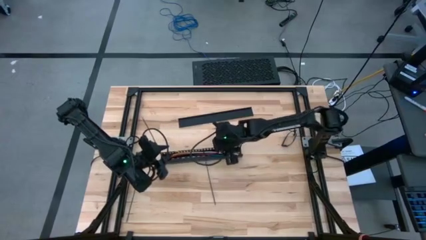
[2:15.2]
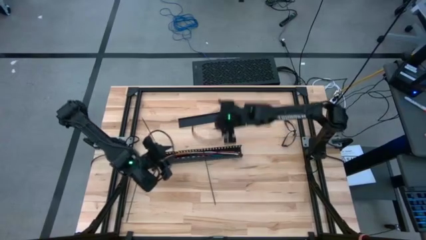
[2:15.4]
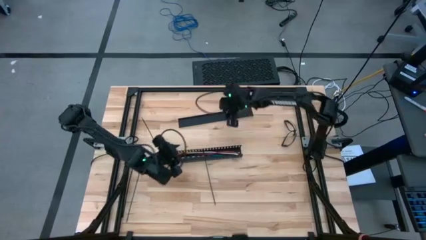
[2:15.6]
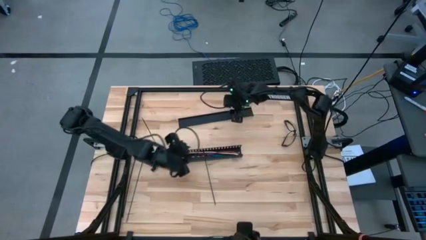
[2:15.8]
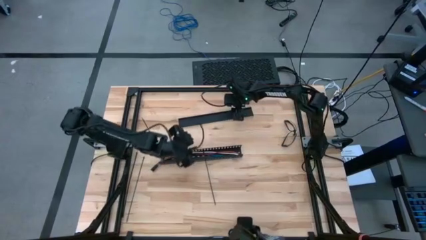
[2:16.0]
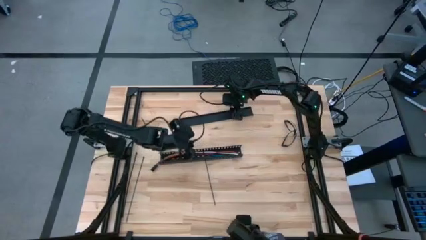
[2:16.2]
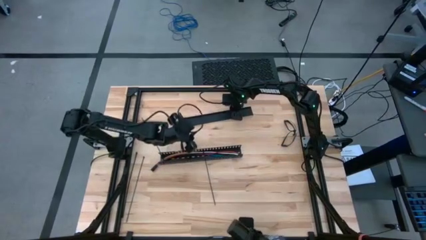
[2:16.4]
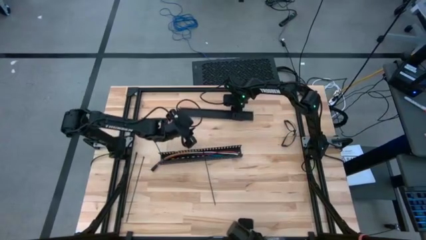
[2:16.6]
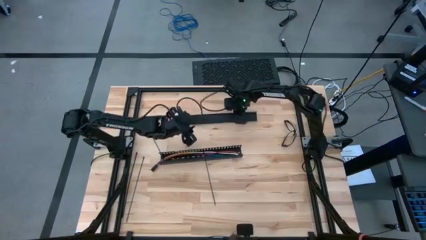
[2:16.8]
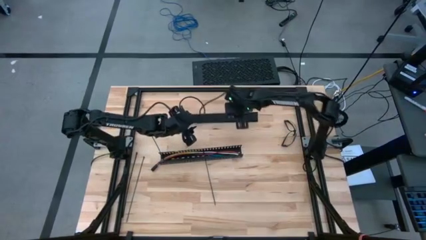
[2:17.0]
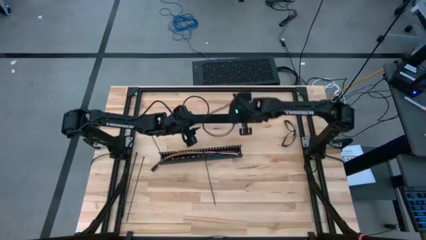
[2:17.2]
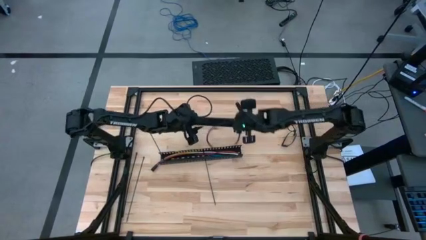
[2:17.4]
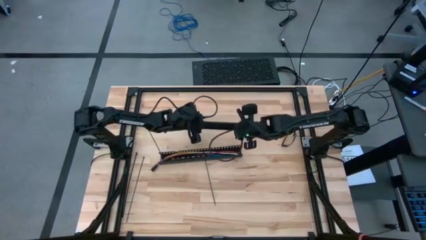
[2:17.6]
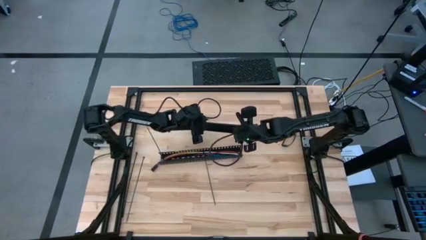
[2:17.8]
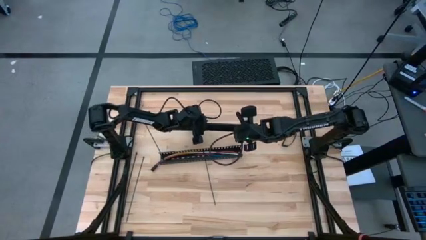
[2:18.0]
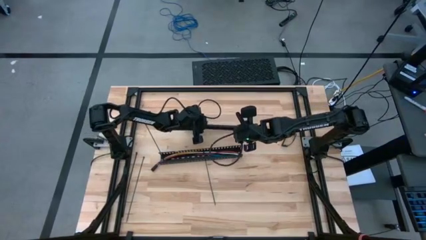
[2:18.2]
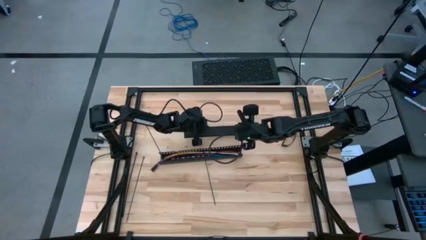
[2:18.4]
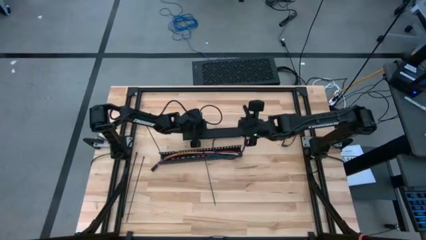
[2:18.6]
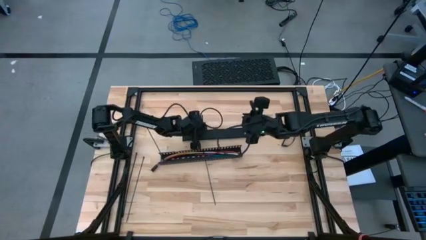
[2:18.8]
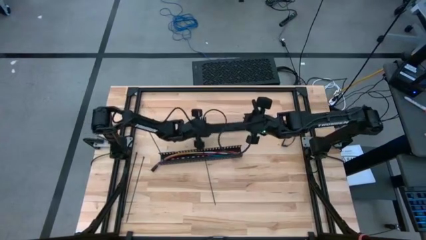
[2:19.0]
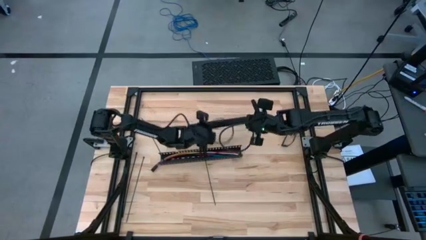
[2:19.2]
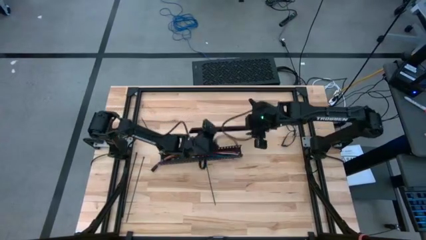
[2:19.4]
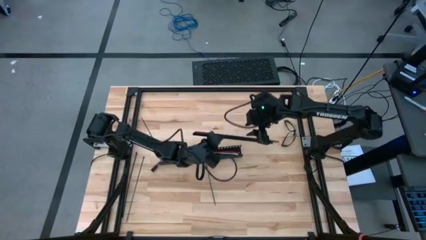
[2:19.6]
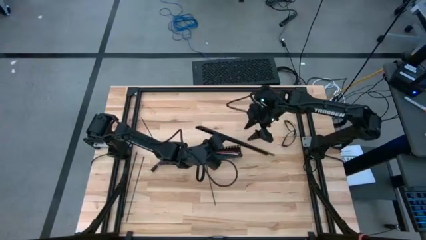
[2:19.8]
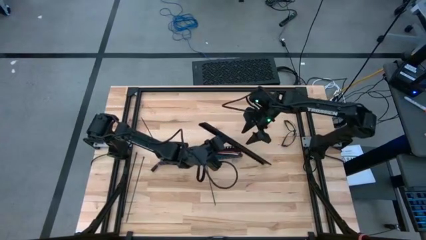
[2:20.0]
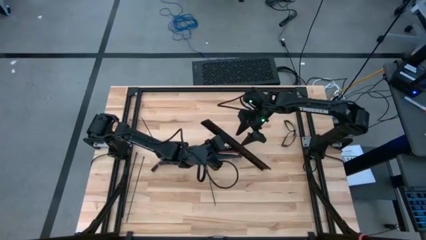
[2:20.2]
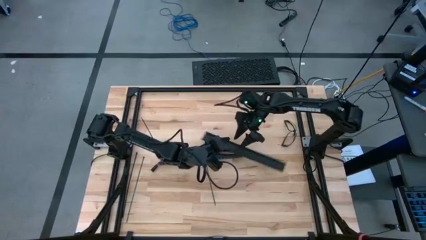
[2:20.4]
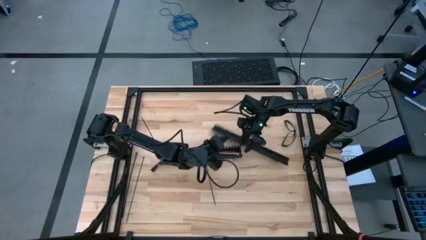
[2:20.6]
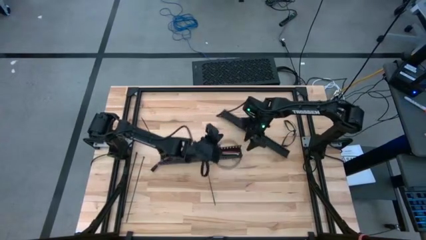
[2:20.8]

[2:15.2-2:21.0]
Task: Ziptie cables
Insert the cover on the black cable duct

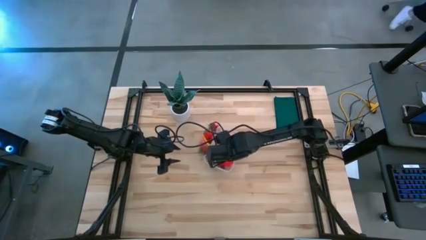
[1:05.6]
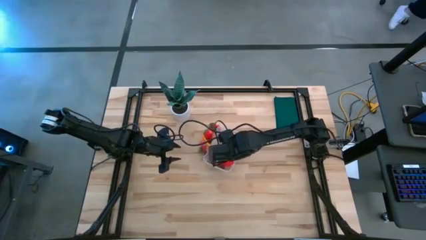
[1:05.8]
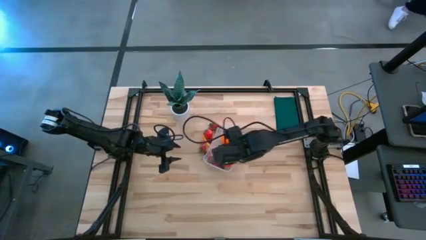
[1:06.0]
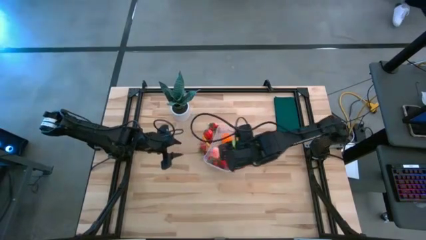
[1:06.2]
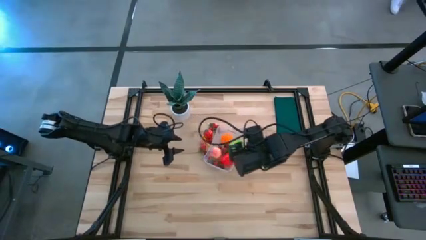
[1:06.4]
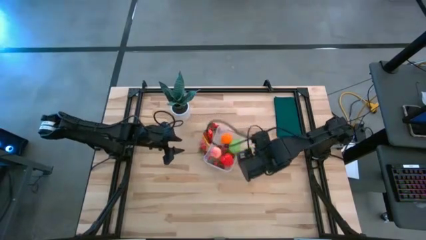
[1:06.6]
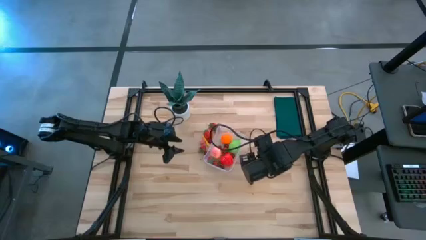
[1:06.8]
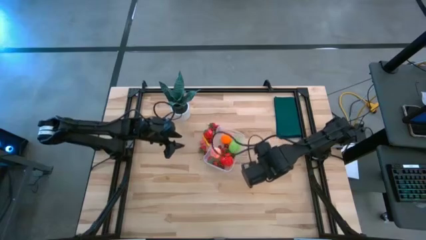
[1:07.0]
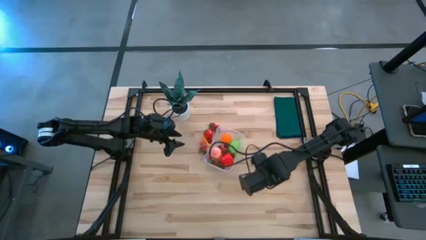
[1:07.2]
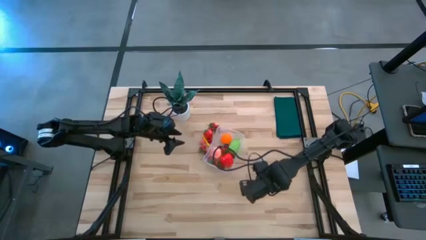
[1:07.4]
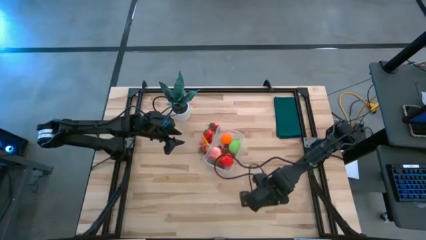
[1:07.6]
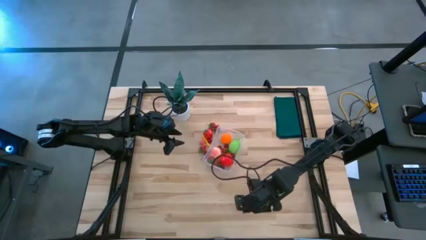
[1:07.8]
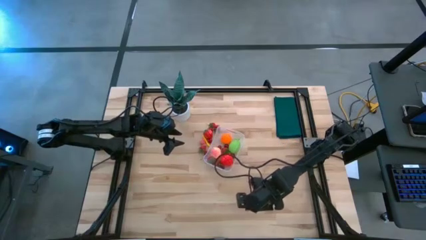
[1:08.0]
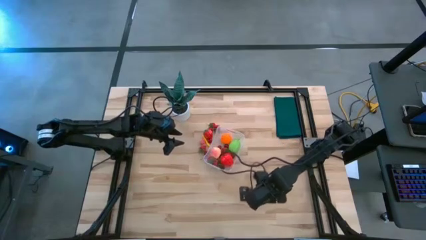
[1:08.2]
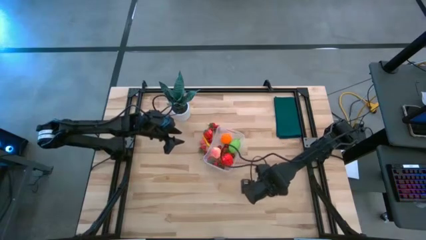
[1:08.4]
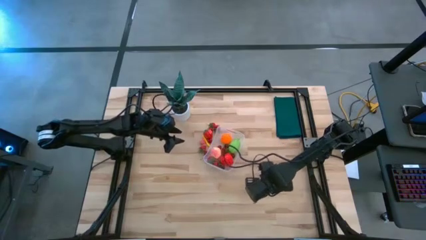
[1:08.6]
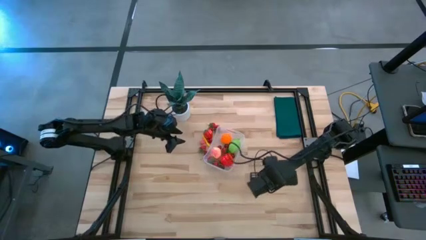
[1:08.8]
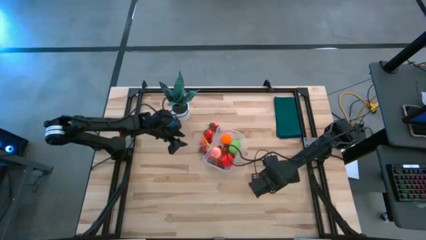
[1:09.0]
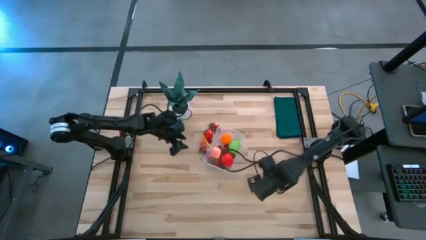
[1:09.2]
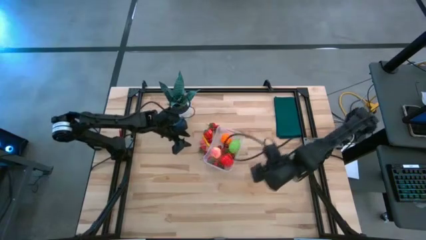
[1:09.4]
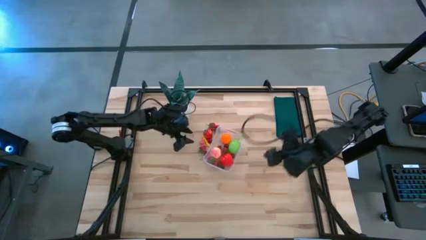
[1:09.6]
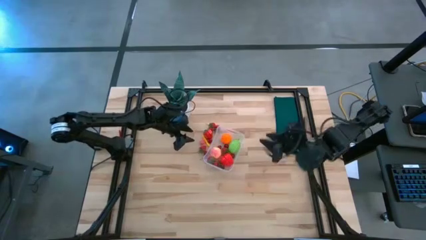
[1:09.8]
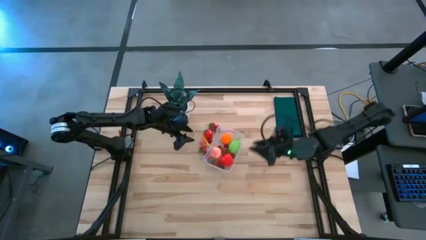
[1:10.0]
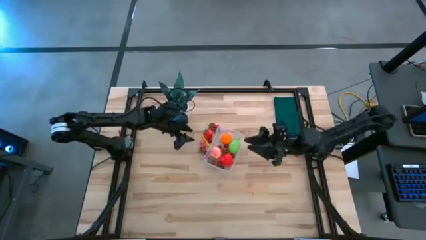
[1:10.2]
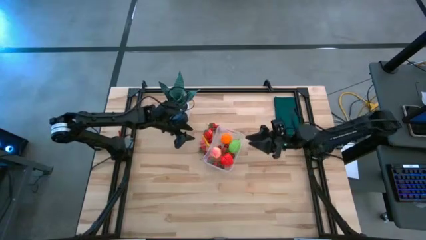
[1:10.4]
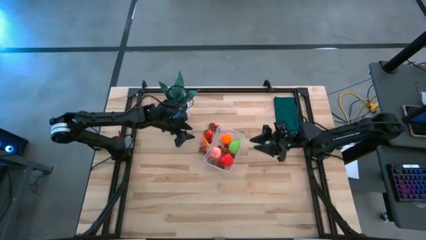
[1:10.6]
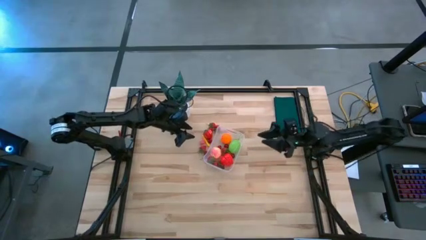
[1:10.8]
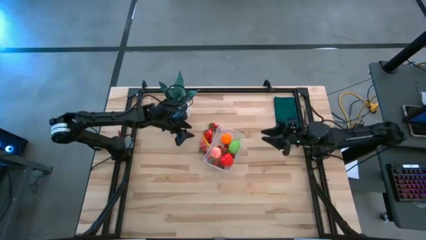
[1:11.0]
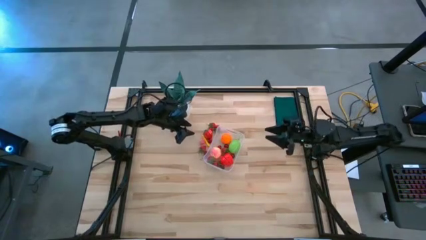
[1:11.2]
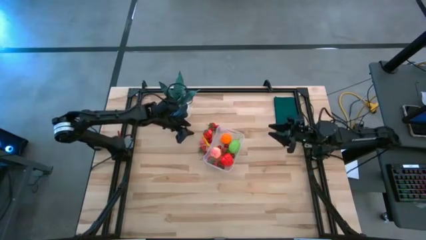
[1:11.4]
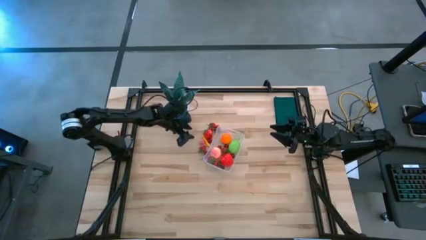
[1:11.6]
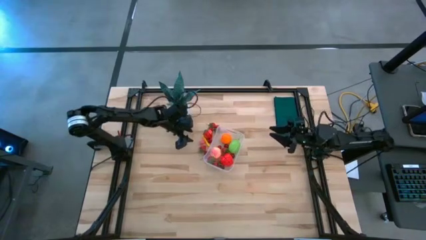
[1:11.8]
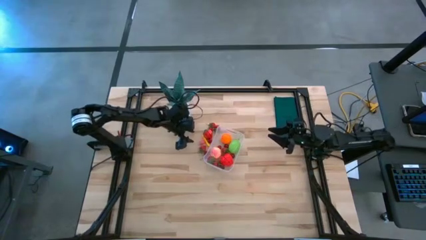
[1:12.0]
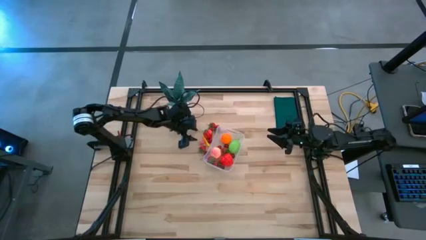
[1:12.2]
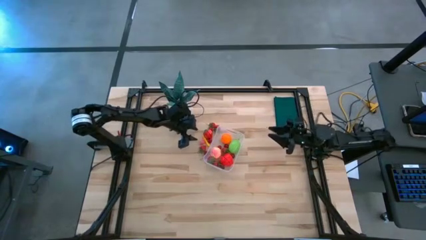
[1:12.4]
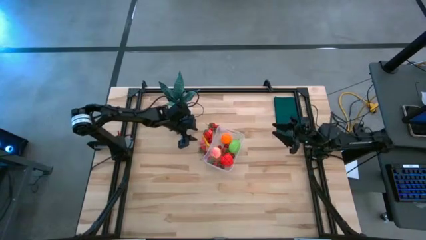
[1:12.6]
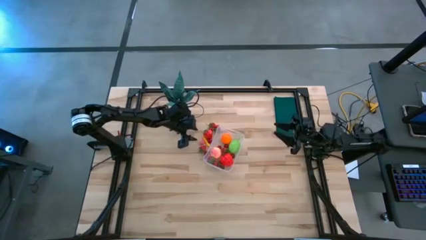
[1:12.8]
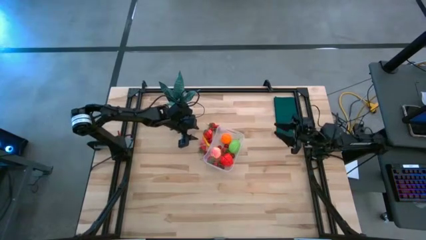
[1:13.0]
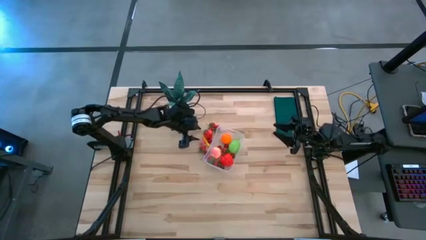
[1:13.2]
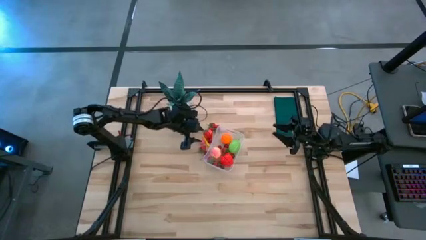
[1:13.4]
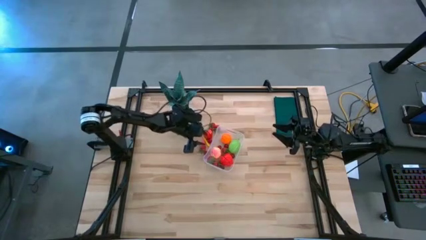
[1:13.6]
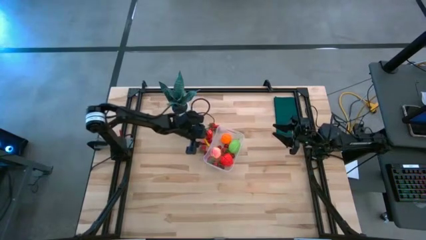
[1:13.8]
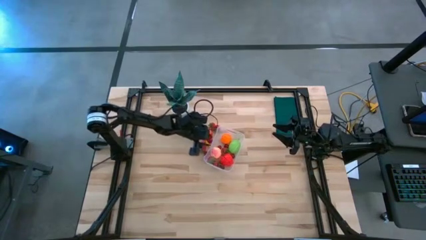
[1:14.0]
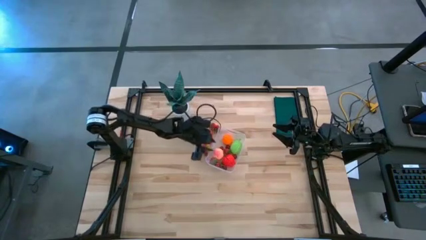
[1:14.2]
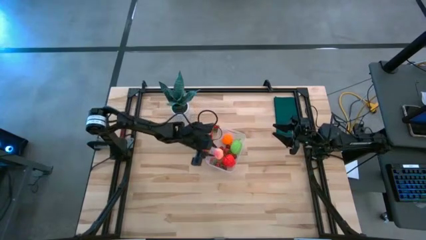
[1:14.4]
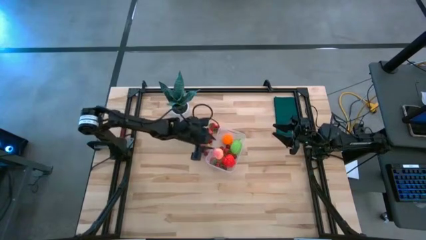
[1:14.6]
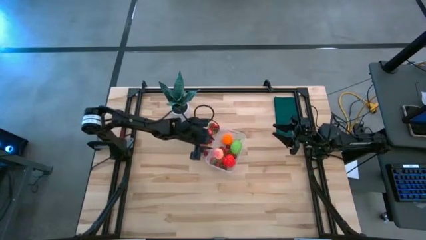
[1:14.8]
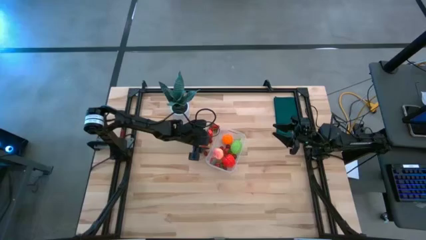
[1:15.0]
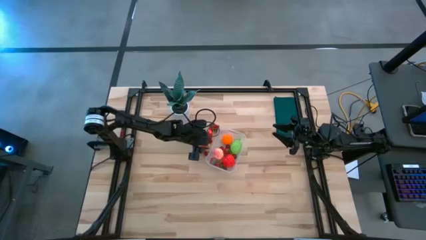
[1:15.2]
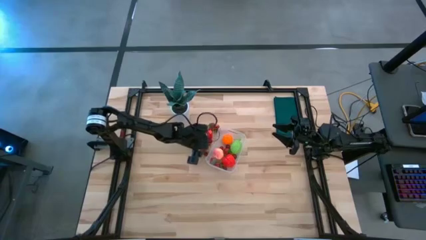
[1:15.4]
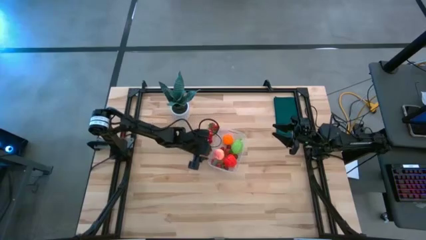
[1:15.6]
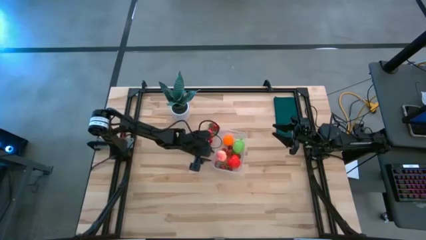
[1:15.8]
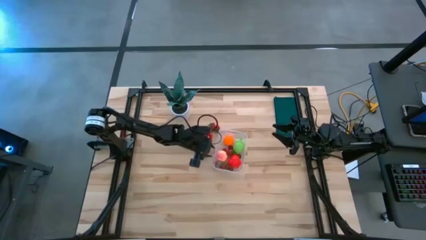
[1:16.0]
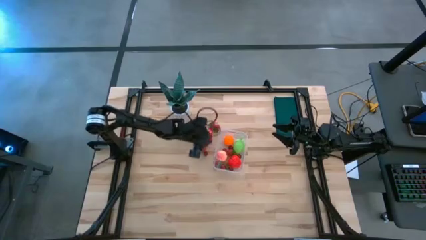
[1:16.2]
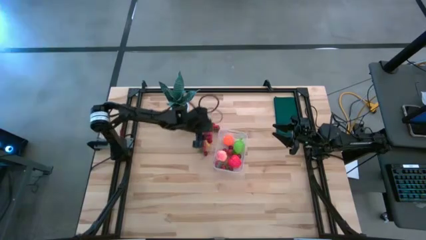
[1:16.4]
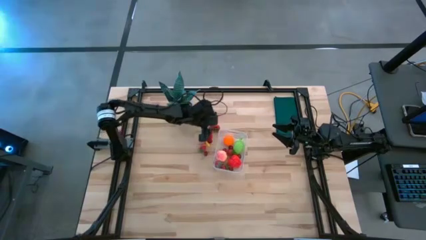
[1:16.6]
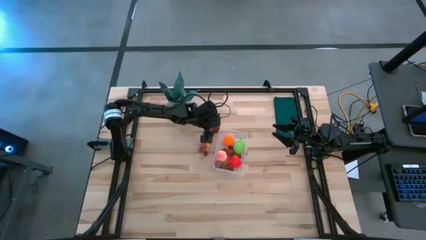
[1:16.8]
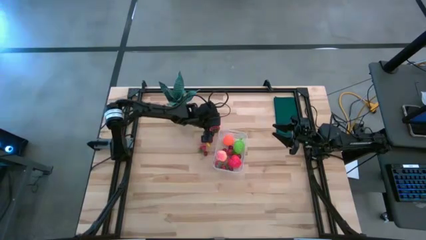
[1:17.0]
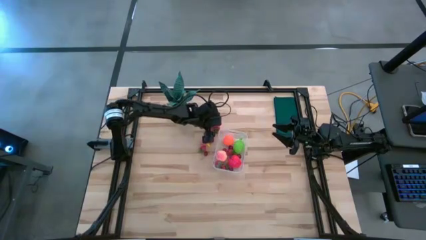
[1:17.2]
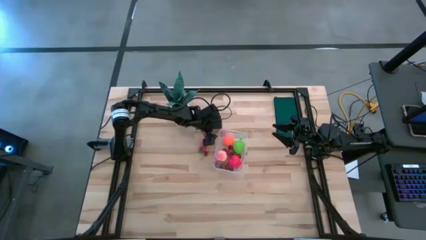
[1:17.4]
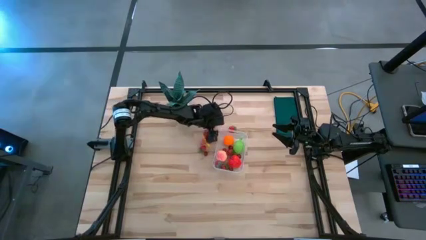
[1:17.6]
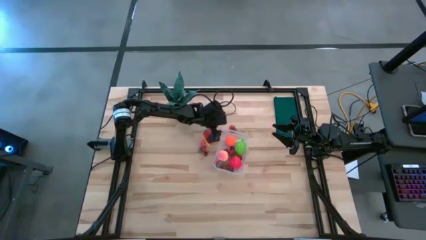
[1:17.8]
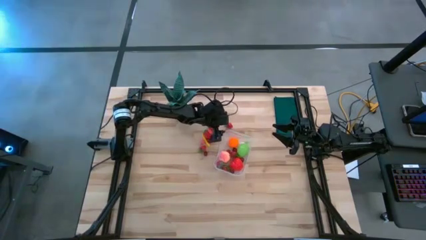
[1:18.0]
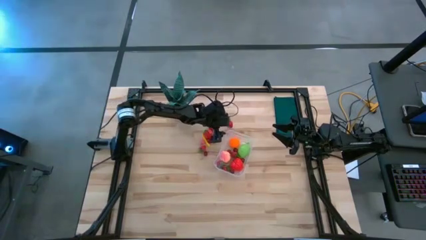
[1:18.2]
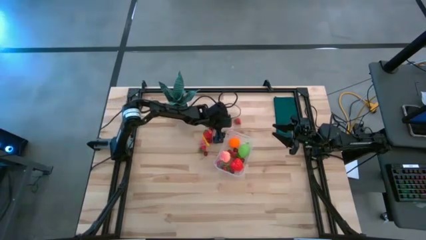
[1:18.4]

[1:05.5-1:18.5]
Task: Pick and placing Produce into tupperware
Put the red strawberry into the container
